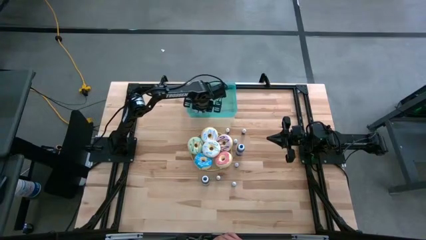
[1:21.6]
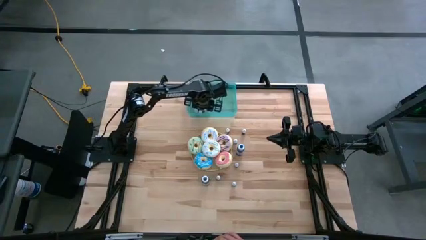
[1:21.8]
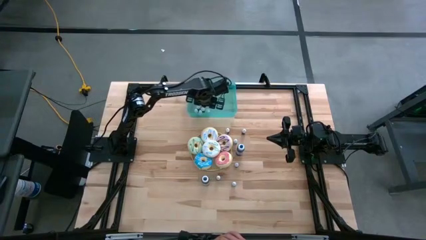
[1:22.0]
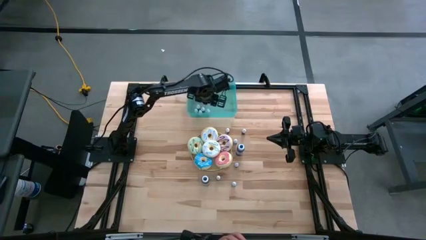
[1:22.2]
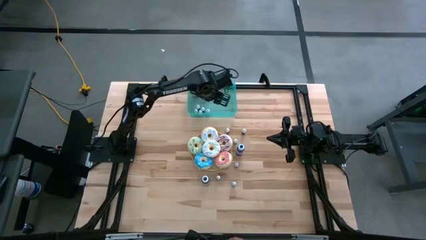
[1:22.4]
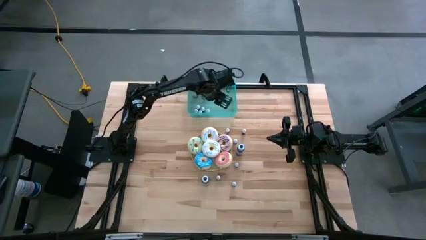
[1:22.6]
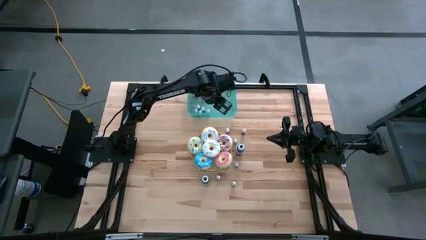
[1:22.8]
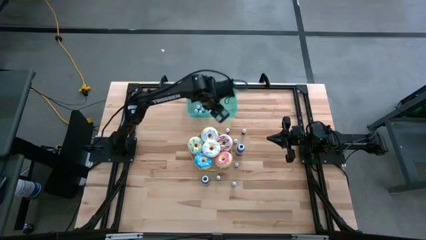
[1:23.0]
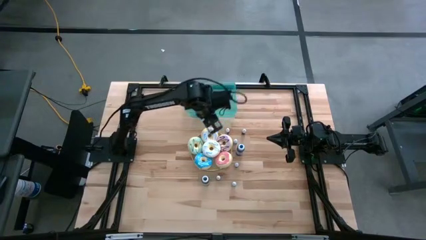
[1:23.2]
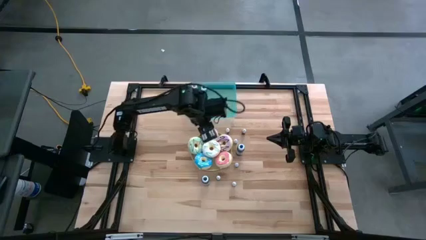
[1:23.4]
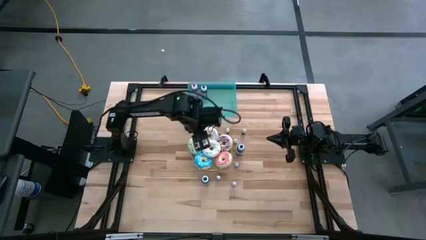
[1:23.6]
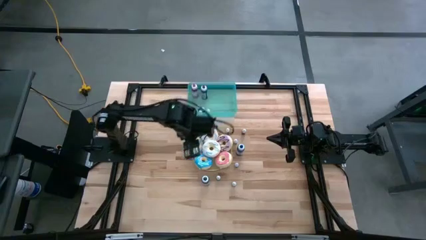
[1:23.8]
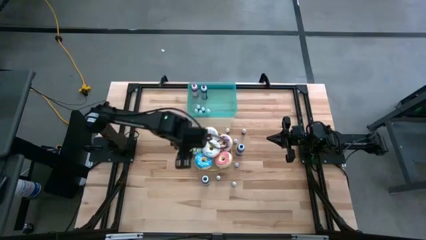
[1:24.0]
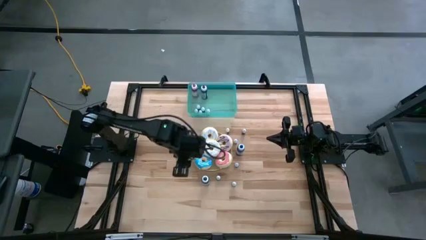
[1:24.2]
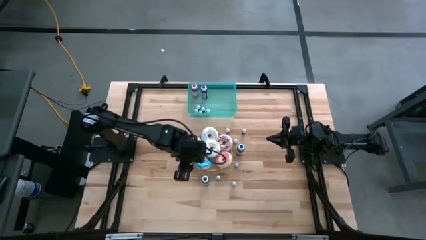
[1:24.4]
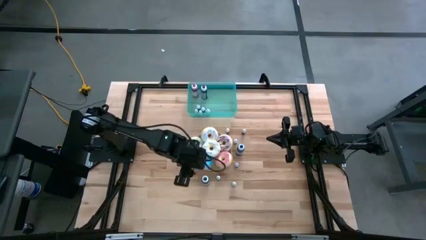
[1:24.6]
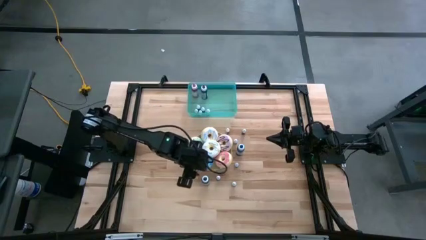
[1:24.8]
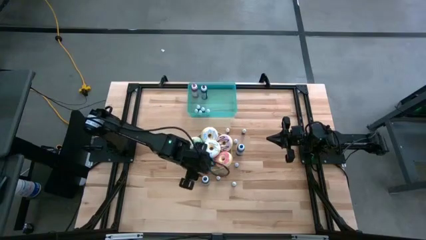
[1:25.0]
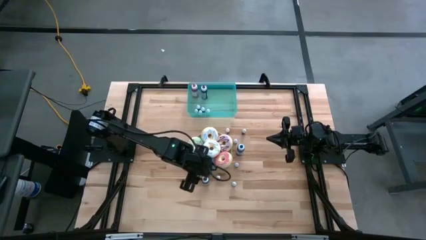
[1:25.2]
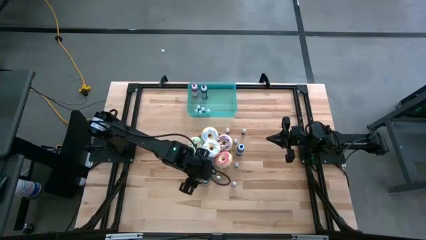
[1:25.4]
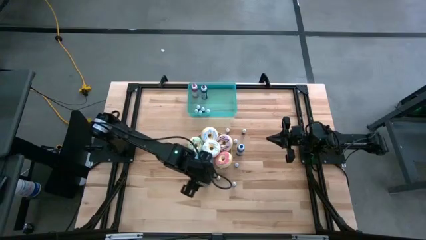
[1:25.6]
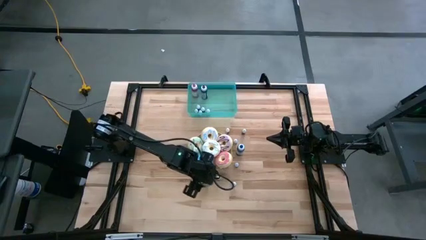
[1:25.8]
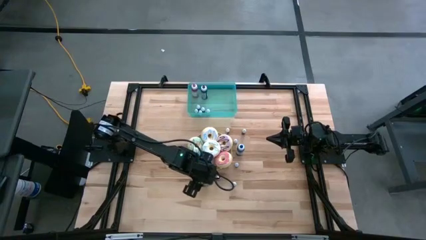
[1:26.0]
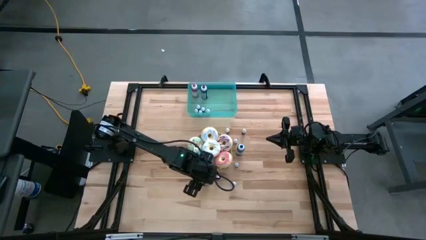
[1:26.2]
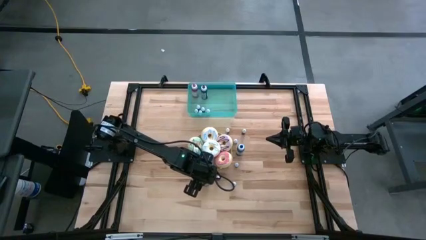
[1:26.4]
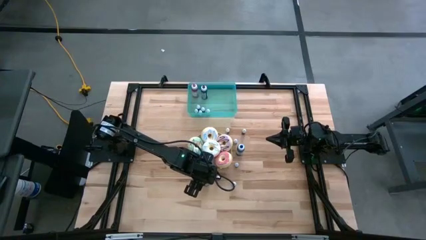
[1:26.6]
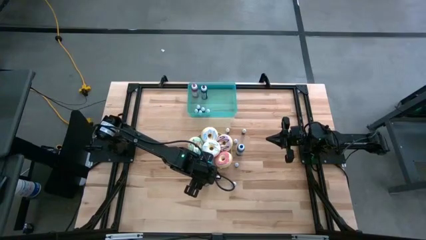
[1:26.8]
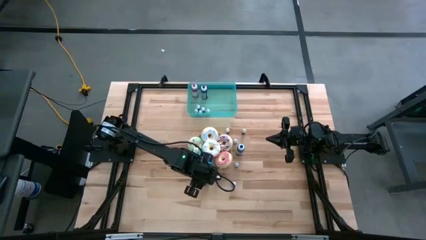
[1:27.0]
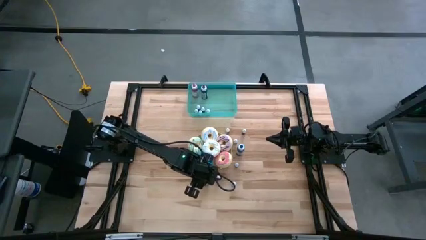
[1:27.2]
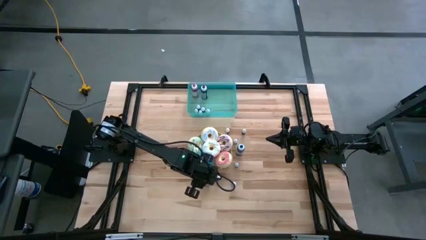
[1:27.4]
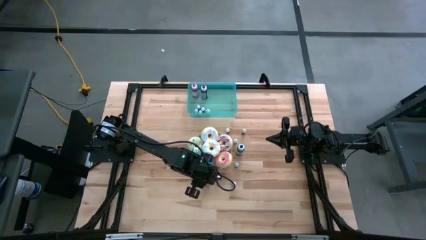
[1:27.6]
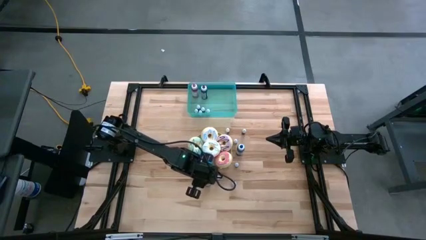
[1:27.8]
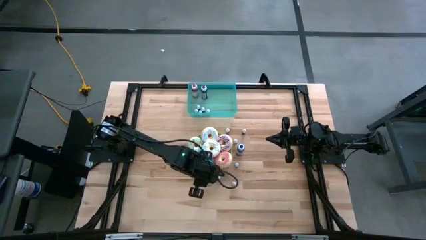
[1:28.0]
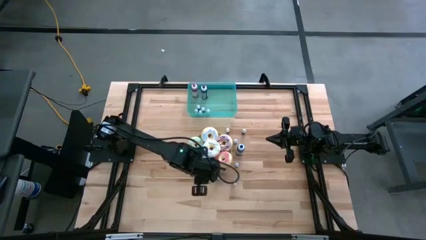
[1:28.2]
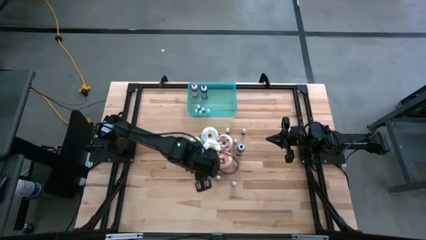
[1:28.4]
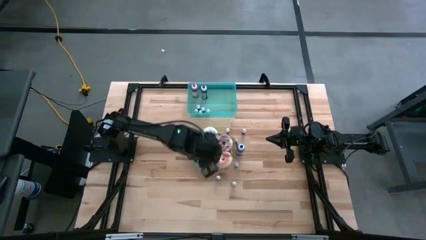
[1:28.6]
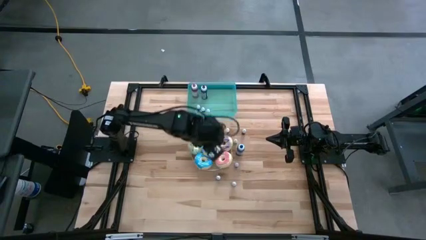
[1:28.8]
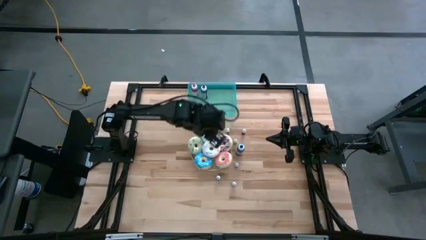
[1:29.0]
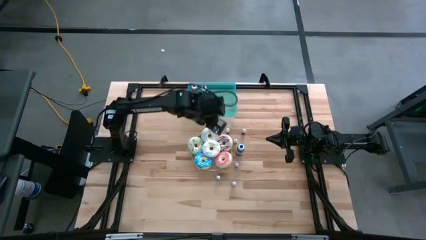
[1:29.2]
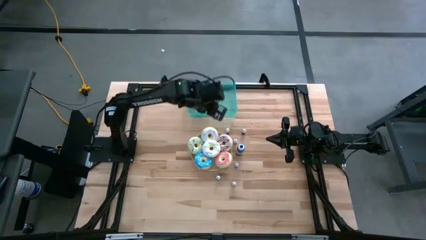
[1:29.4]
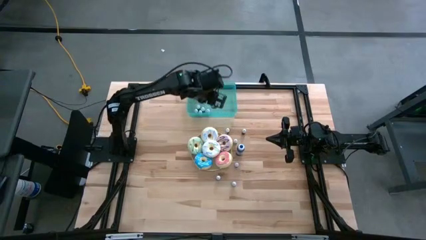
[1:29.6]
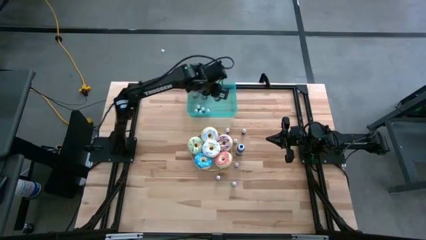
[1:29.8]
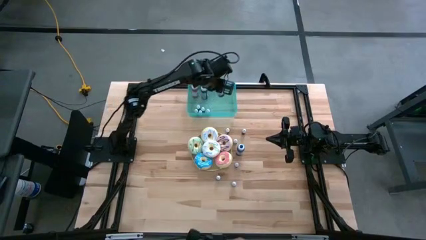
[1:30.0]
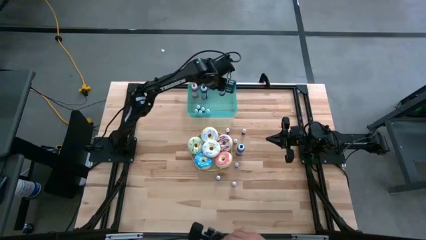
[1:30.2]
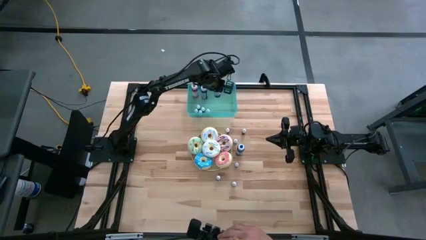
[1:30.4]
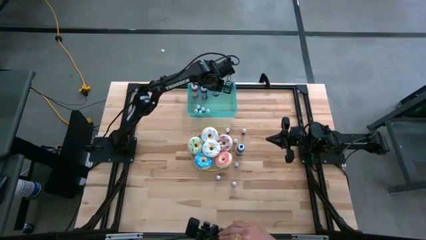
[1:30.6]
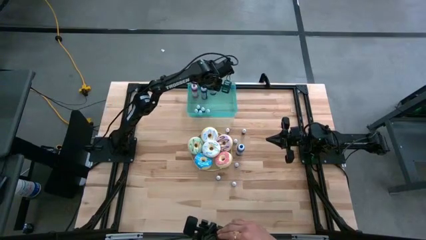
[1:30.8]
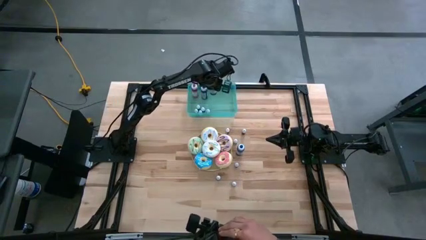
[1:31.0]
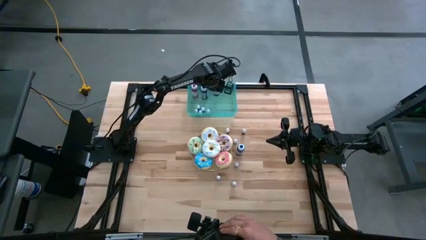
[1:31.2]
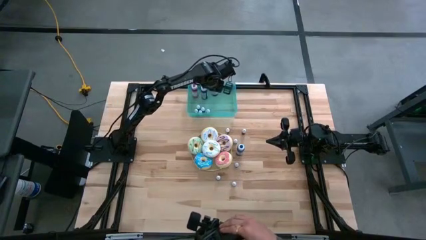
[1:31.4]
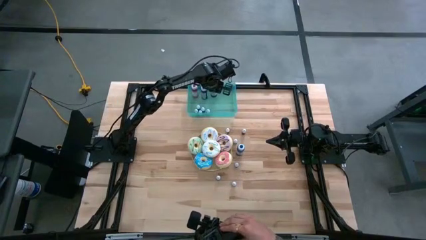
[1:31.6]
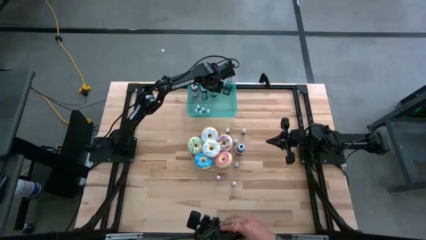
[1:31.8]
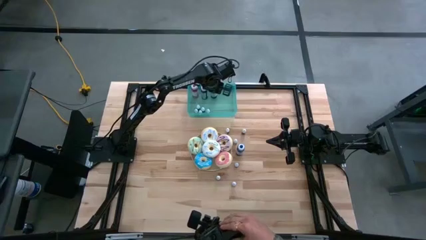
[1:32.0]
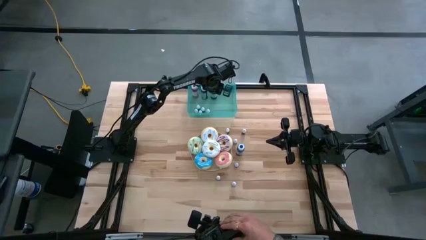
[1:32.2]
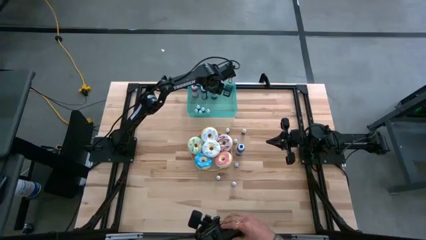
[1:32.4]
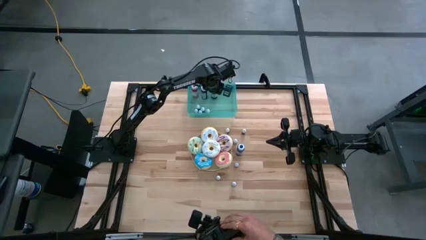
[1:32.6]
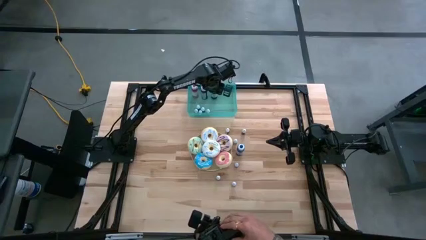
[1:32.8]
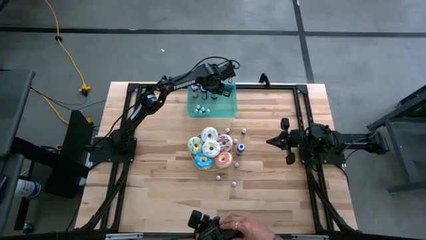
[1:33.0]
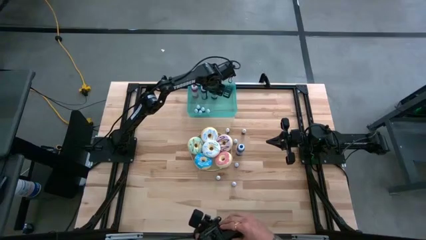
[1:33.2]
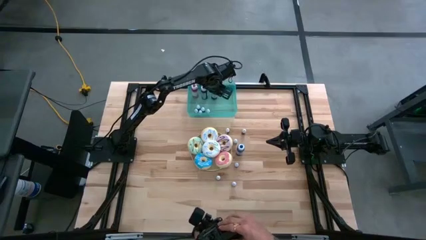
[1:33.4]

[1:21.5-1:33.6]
Task: Pick & Place food coloring
Put the large black food coloring bottle into the green container

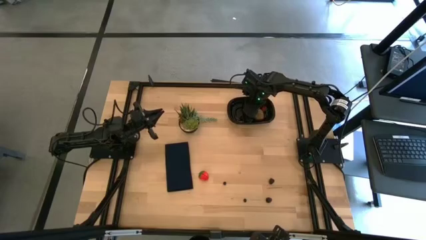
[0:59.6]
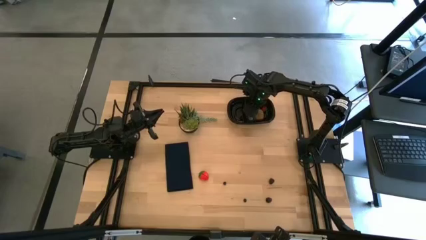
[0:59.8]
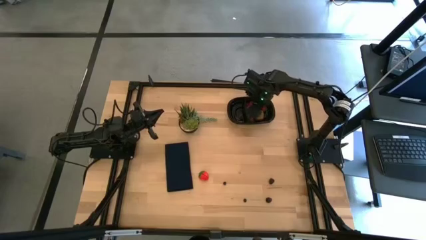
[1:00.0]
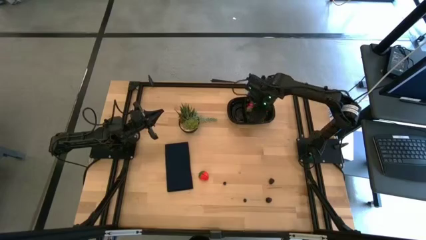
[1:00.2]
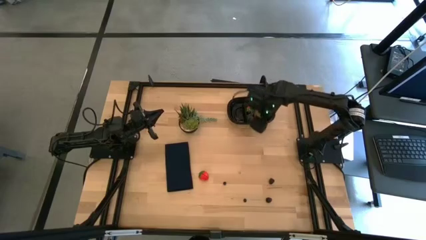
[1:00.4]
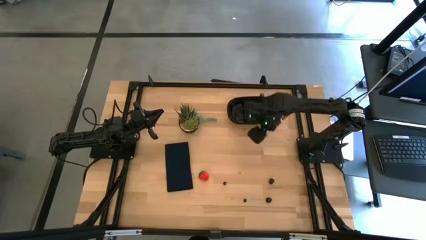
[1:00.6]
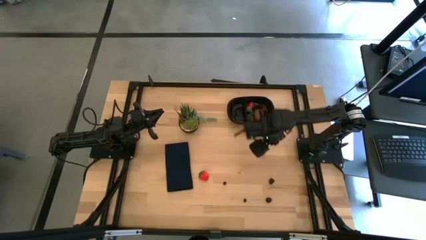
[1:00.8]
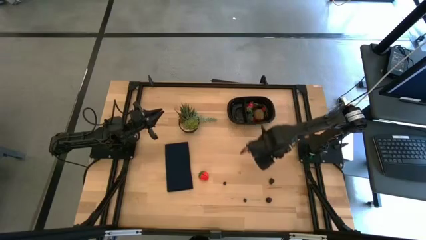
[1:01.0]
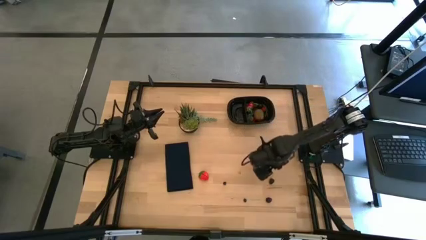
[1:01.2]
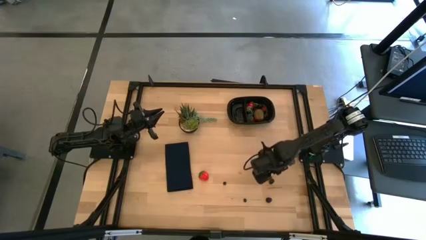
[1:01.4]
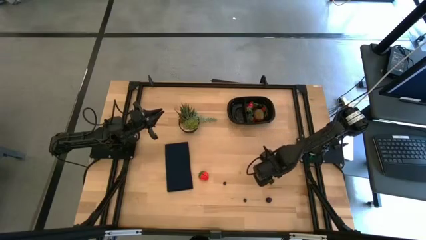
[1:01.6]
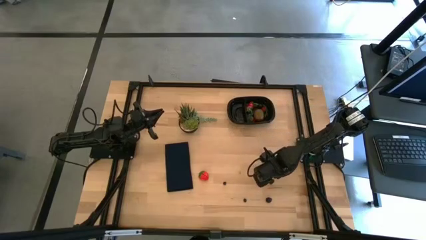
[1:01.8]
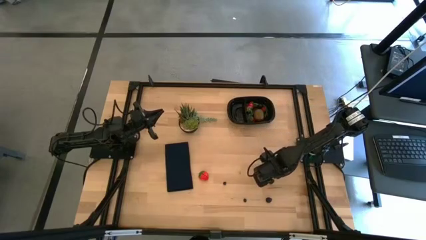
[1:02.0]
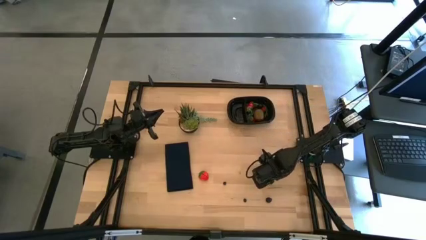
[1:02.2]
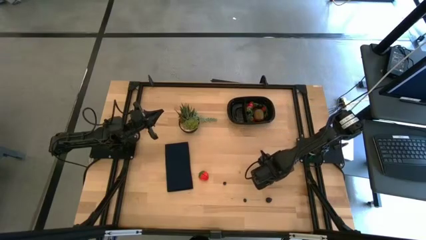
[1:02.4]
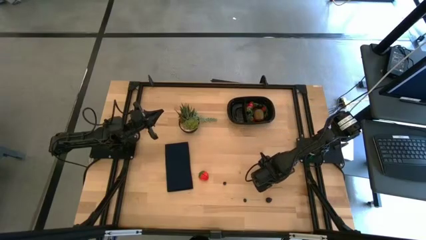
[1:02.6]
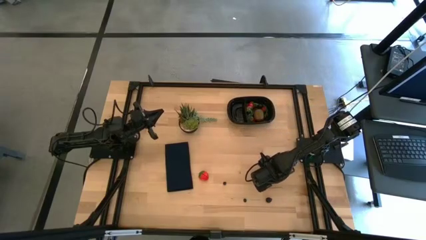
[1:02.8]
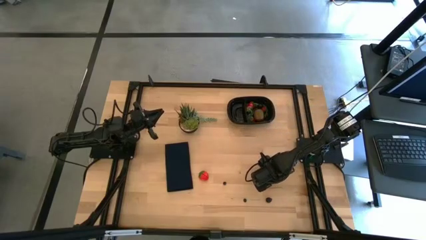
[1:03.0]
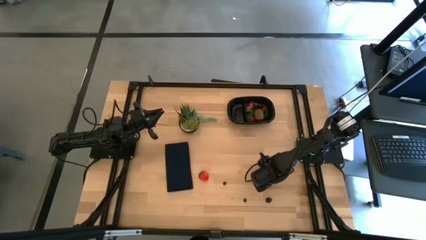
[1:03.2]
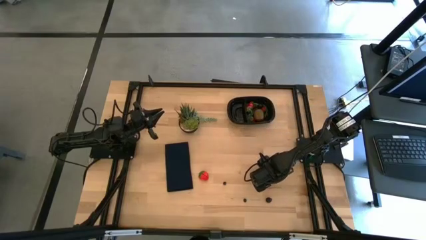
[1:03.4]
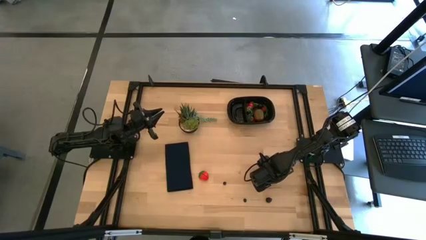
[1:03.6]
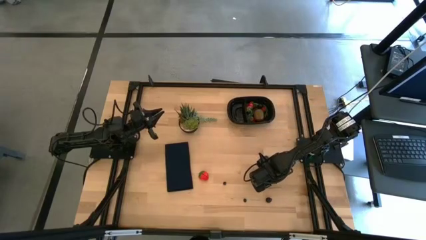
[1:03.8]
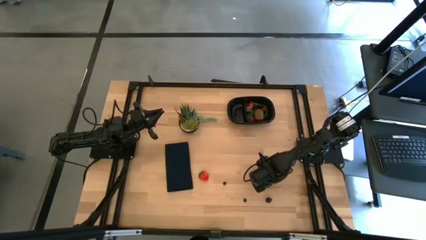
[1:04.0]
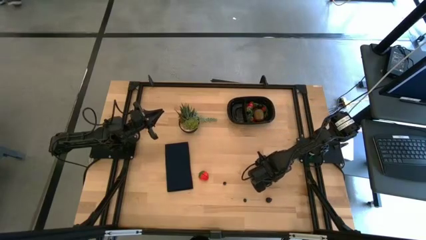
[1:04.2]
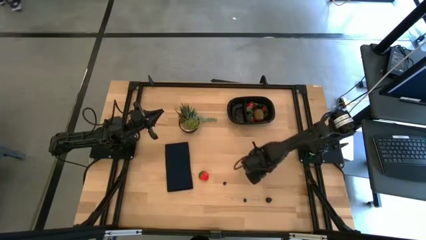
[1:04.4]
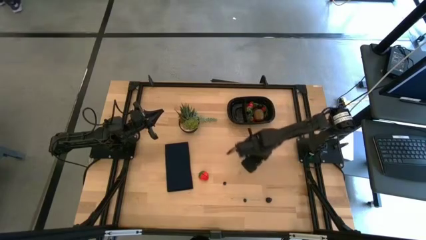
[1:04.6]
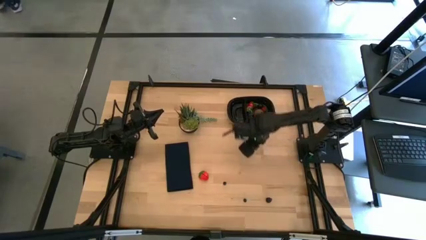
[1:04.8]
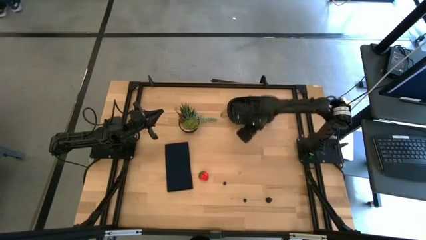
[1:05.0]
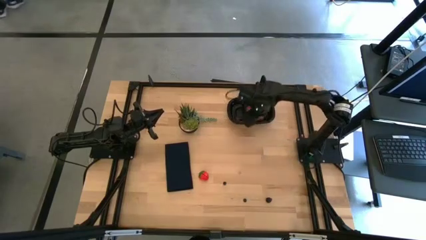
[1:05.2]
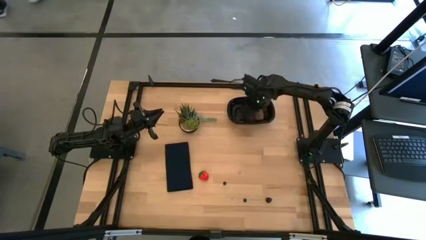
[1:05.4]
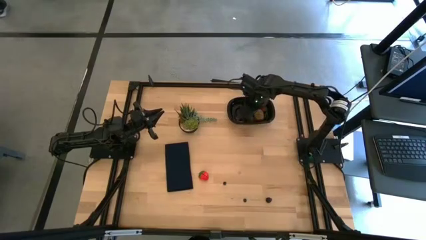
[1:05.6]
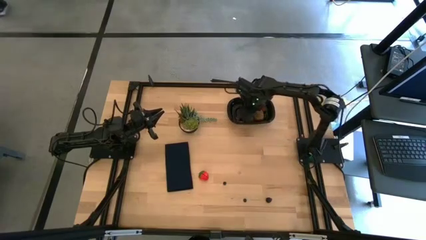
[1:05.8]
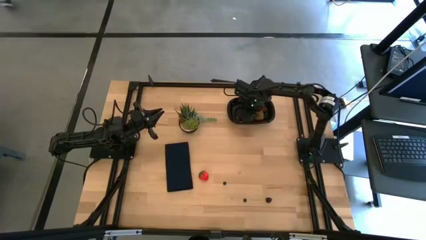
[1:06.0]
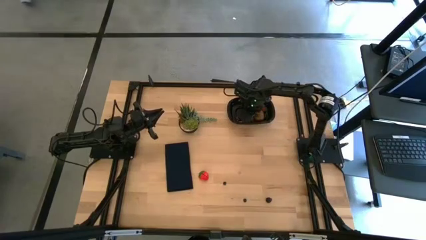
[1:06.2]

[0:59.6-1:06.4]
Task: Pick and placing Produce into tupperware
Put the top blackberry into the black container
